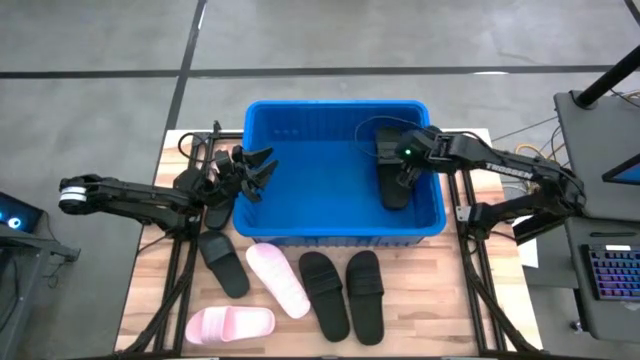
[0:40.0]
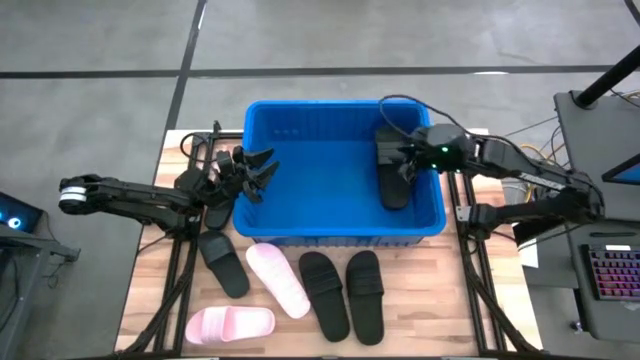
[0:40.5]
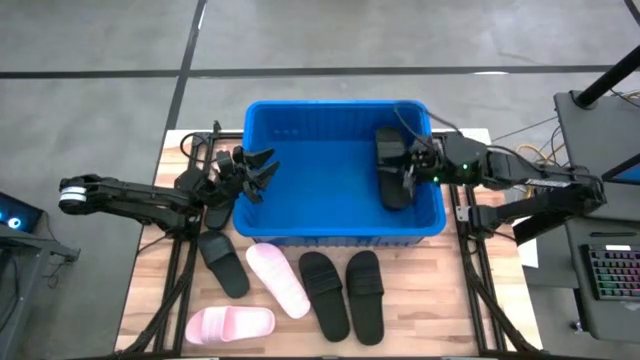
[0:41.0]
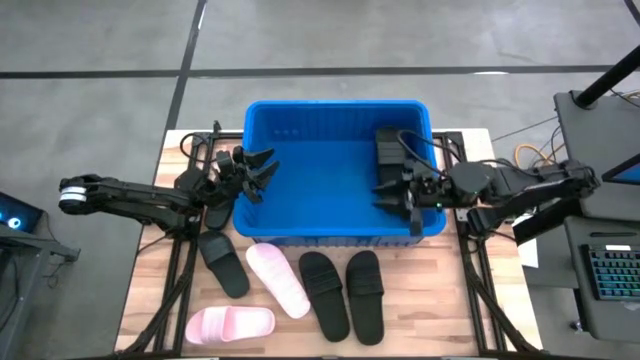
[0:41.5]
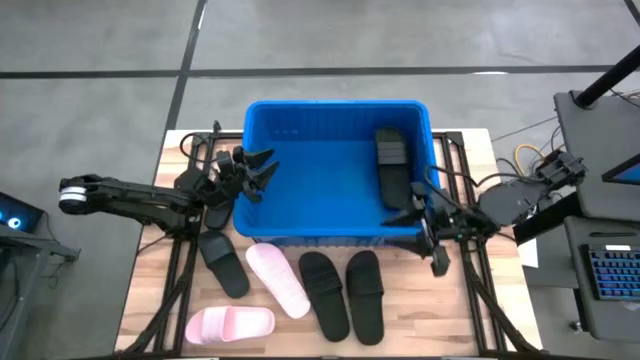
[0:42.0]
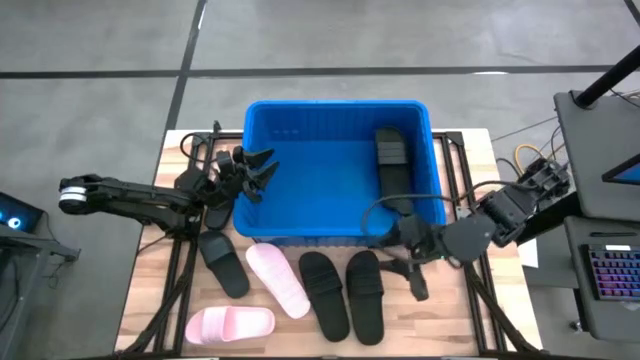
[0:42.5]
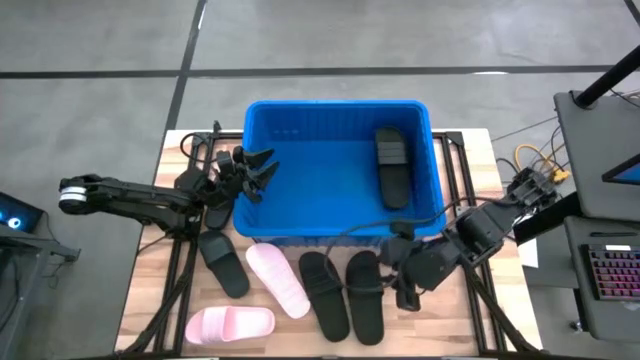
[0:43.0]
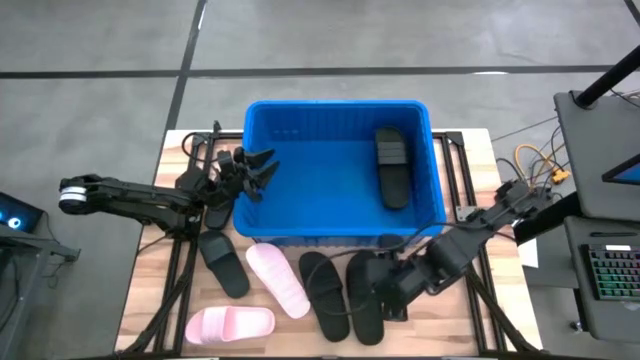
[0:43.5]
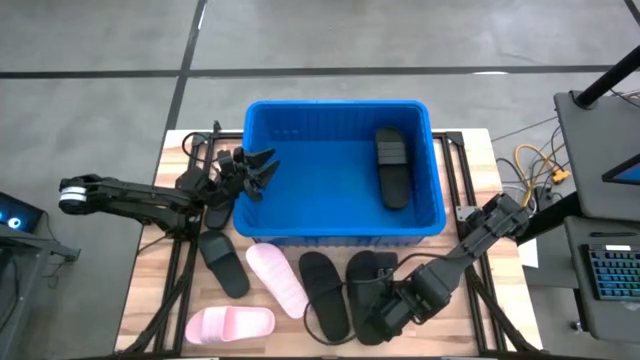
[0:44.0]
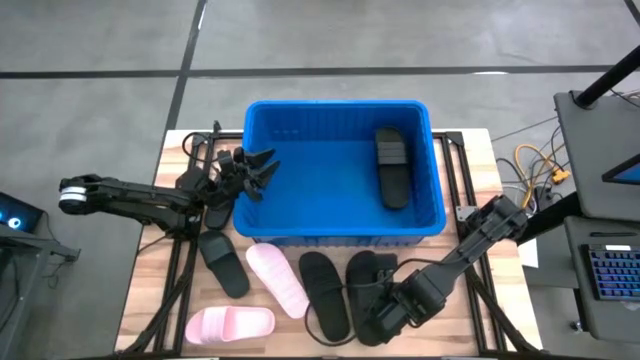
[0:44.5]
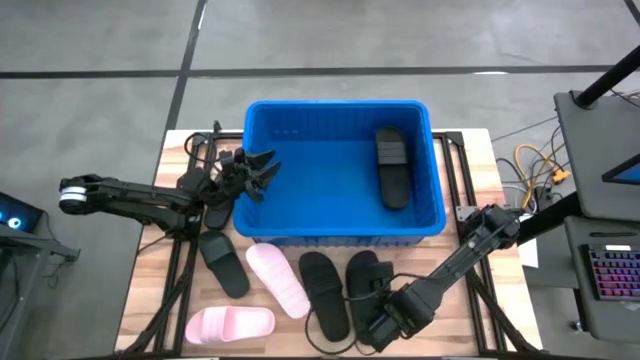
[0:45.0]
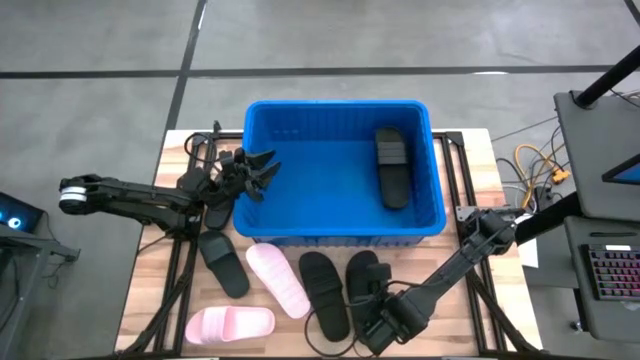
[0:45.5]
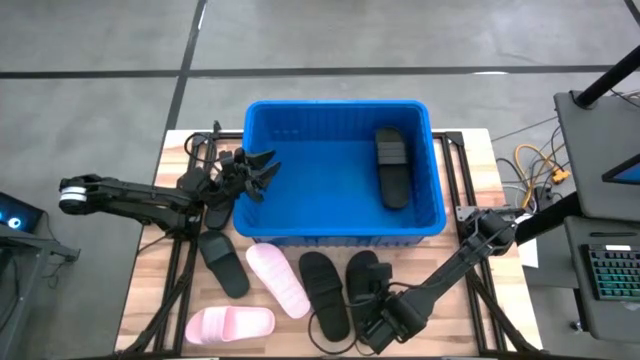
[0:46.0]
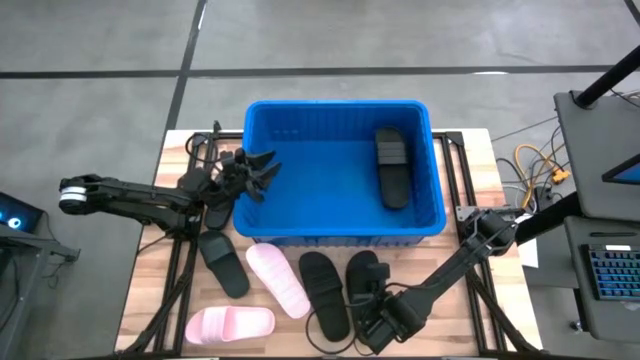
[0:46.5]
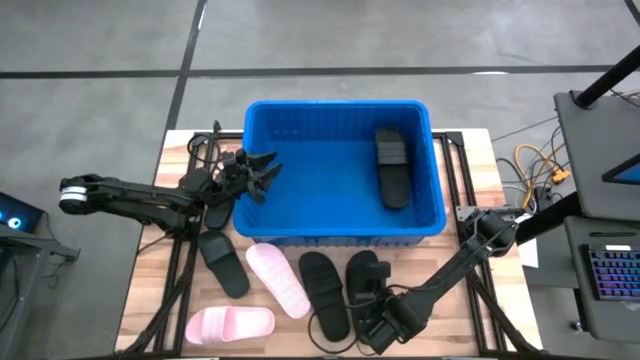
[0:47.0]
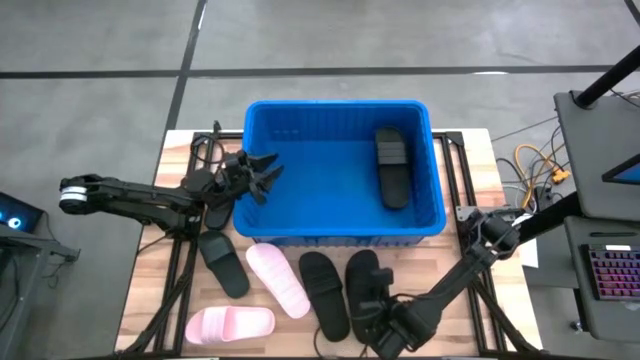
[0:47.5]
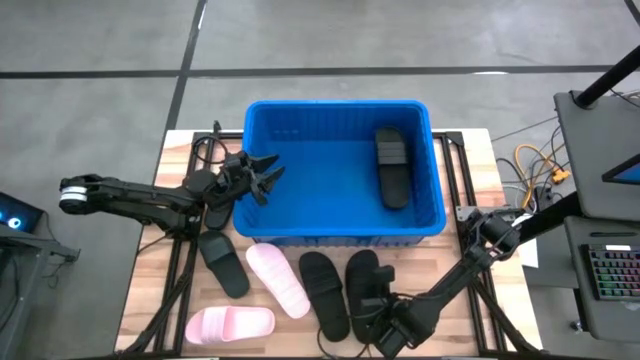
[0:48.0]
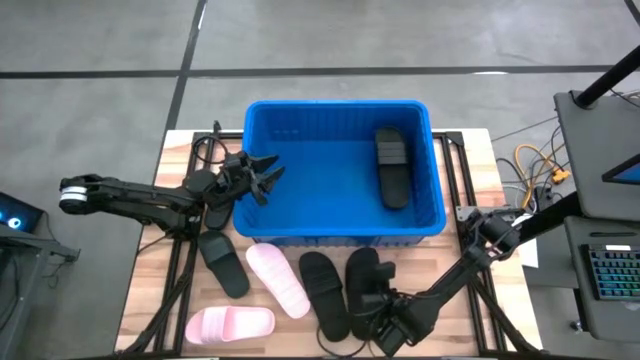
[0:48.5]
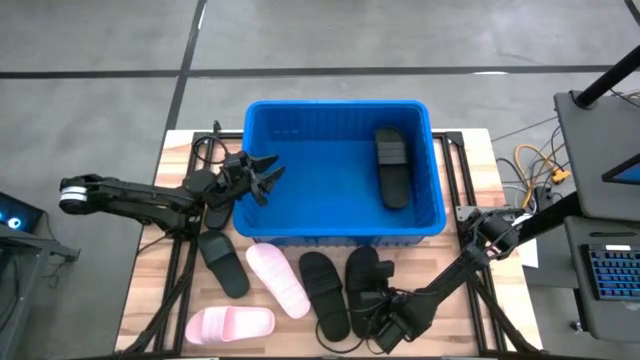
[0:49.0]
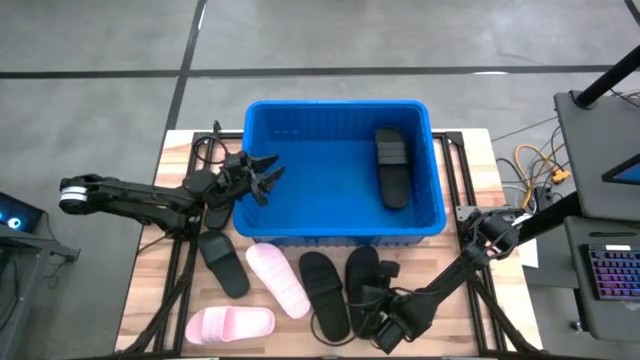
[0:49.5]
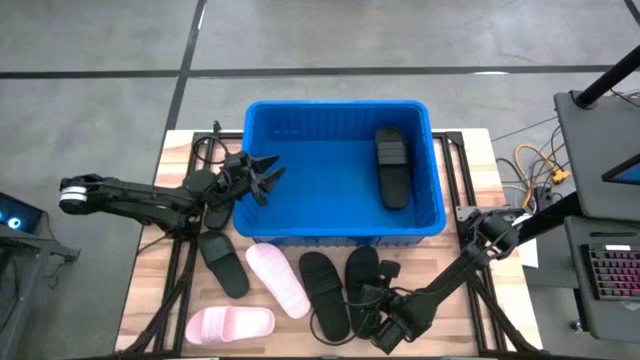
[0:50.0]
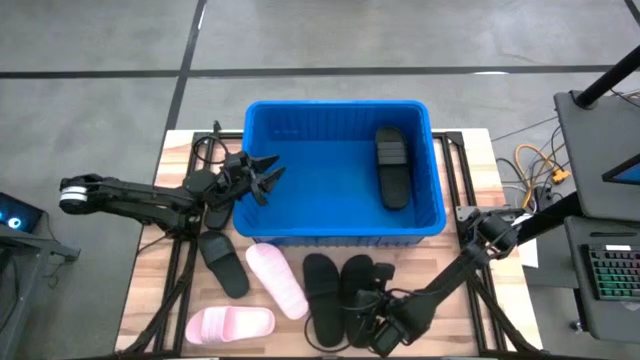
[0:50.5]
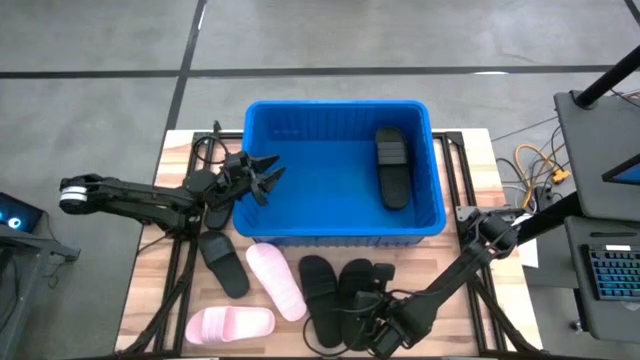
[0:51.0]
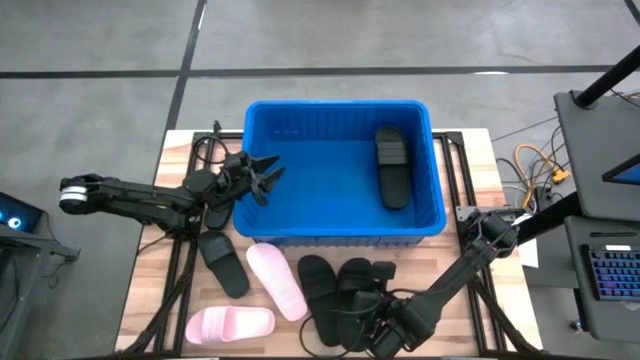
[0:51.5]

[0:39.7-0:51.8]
Task: Pick and place slides into bin
Put the black slide into the blue bin

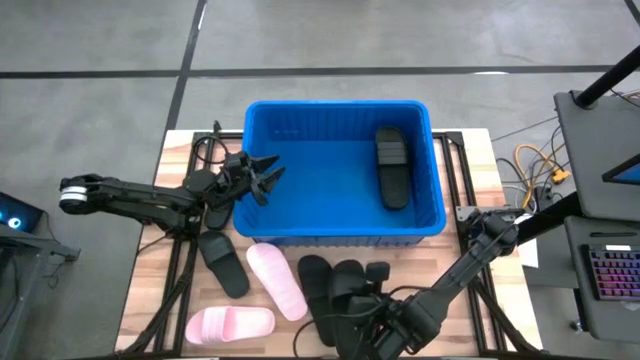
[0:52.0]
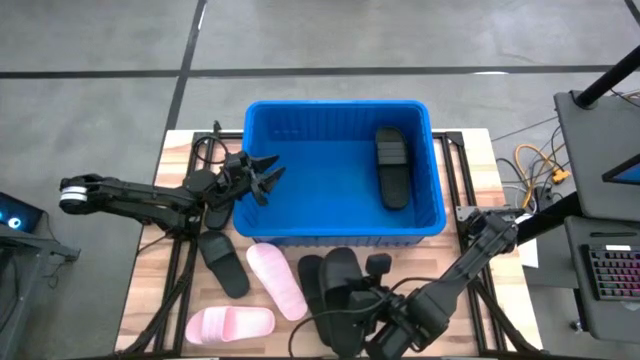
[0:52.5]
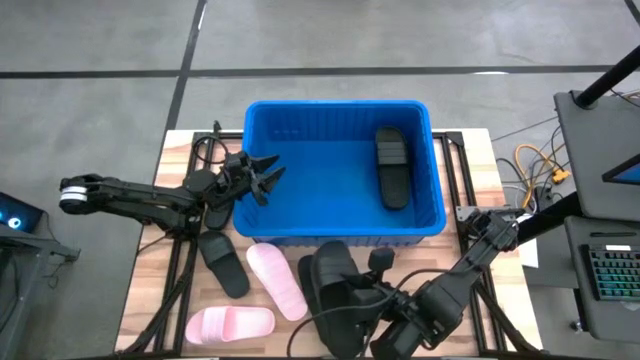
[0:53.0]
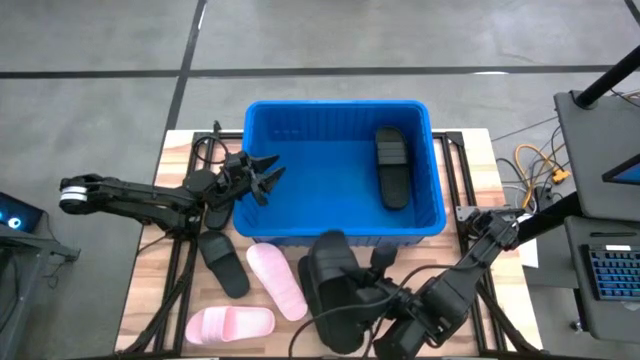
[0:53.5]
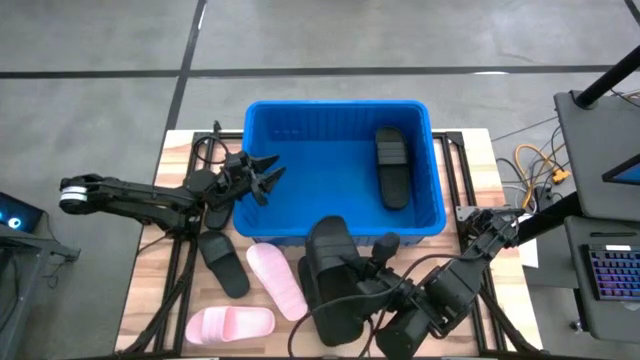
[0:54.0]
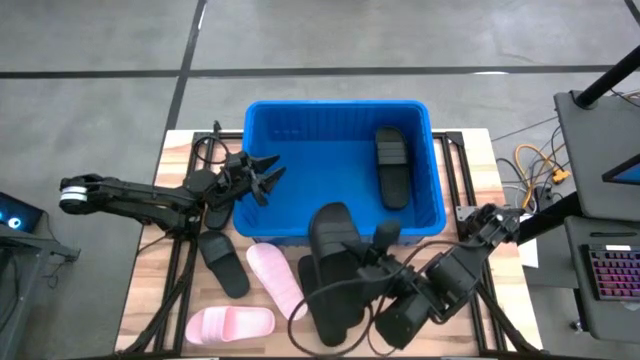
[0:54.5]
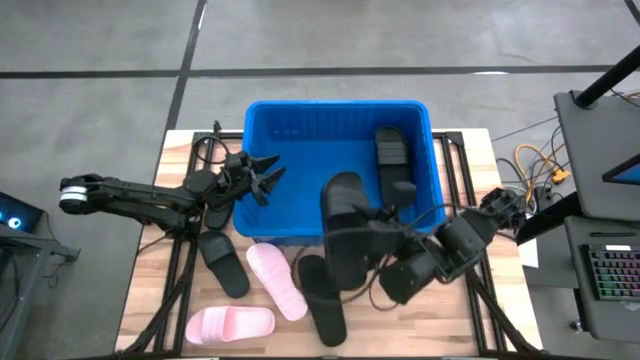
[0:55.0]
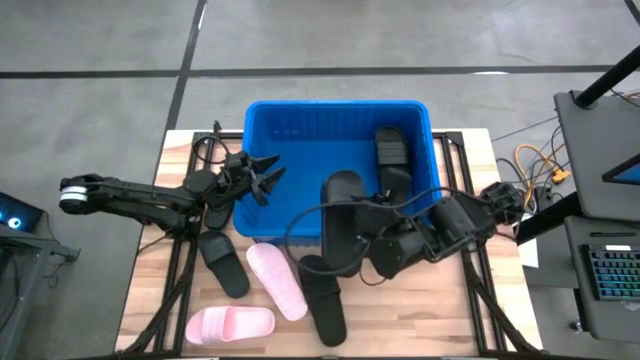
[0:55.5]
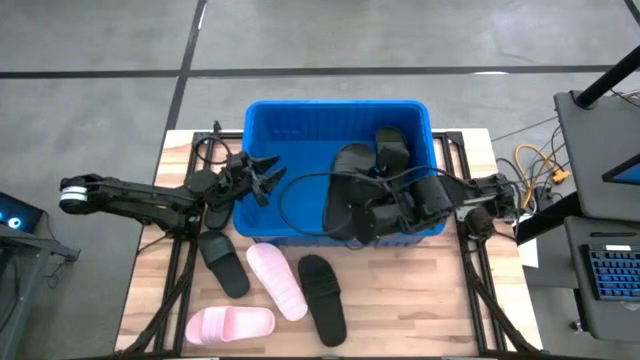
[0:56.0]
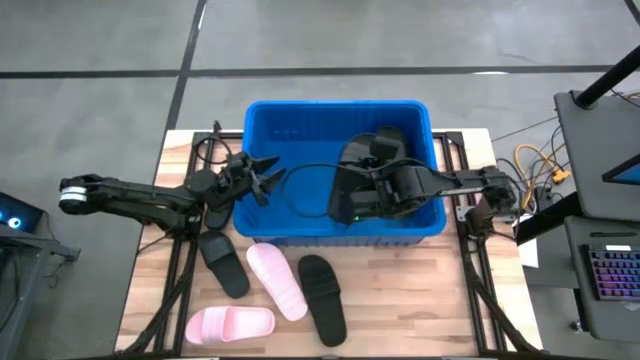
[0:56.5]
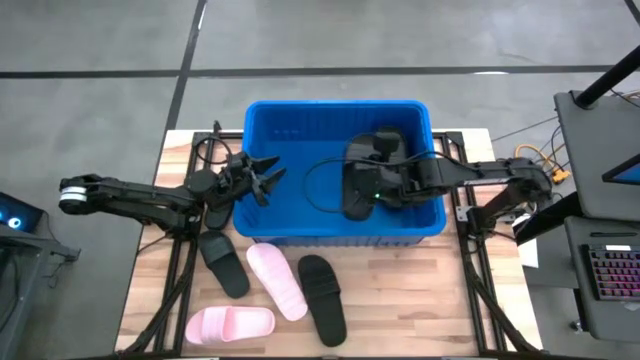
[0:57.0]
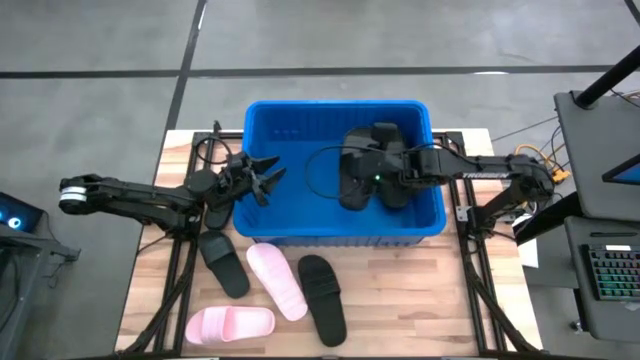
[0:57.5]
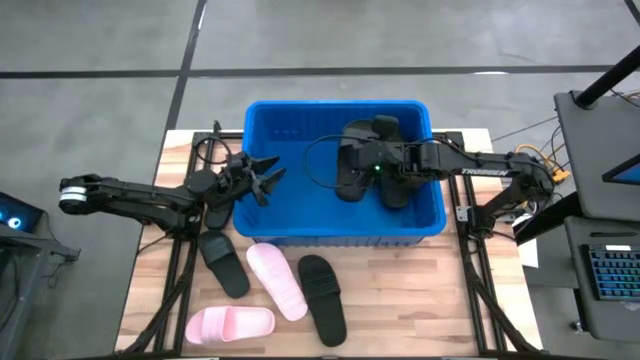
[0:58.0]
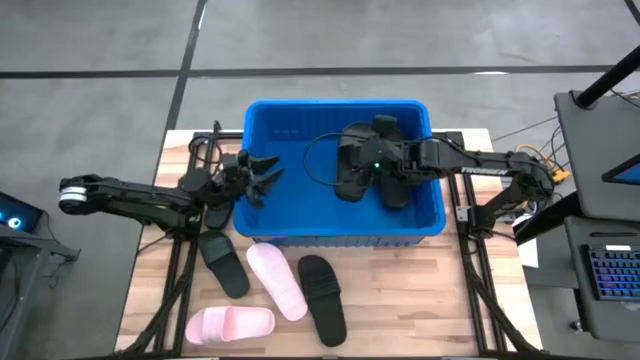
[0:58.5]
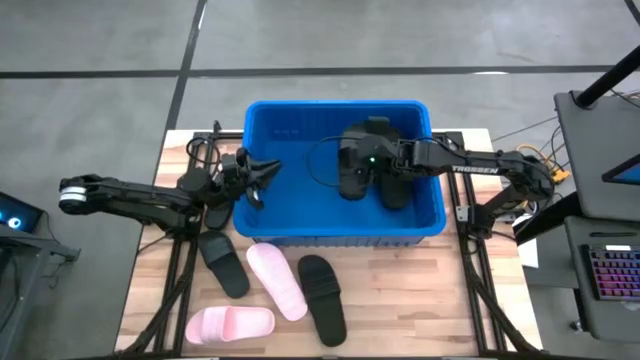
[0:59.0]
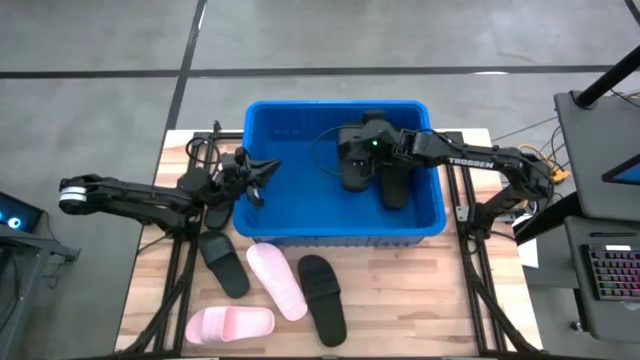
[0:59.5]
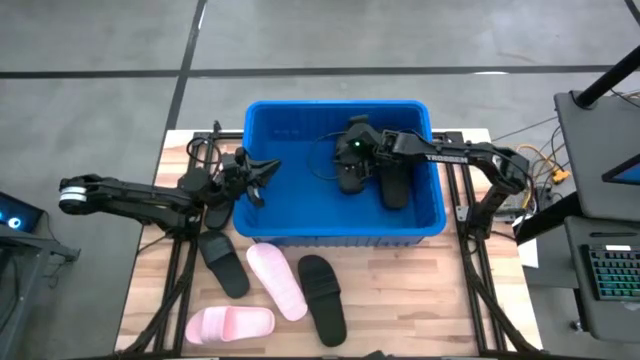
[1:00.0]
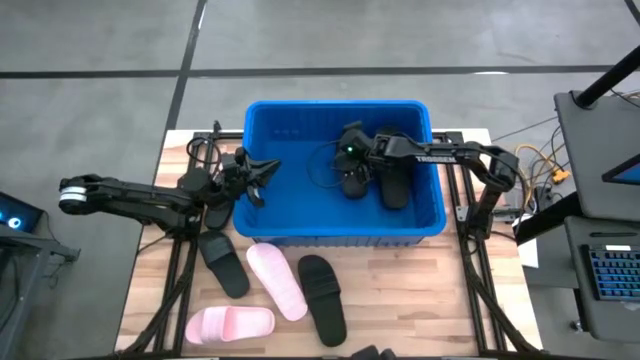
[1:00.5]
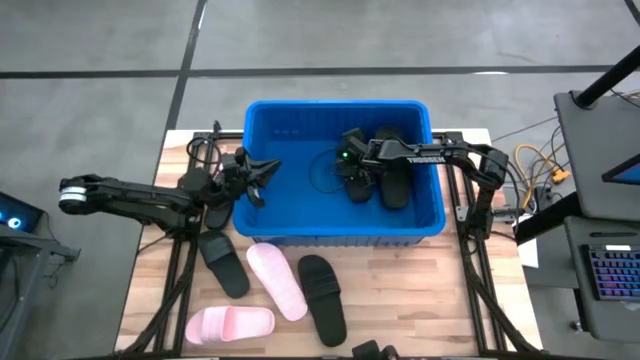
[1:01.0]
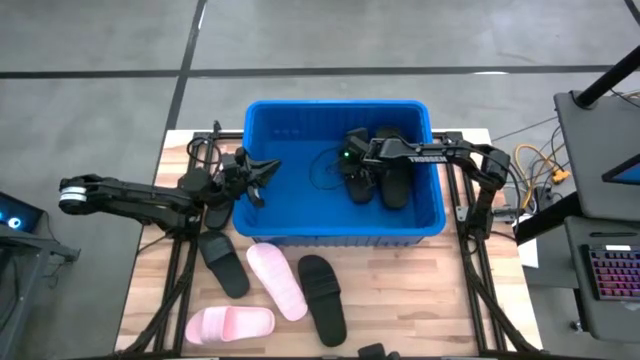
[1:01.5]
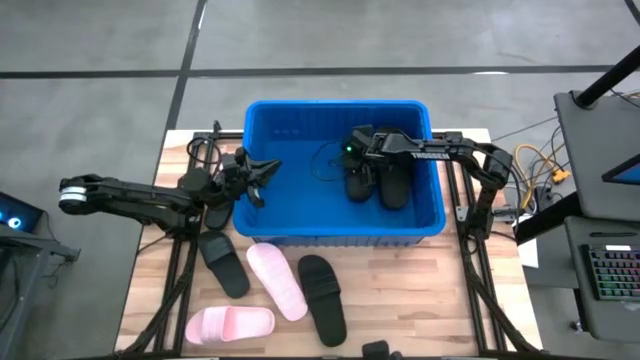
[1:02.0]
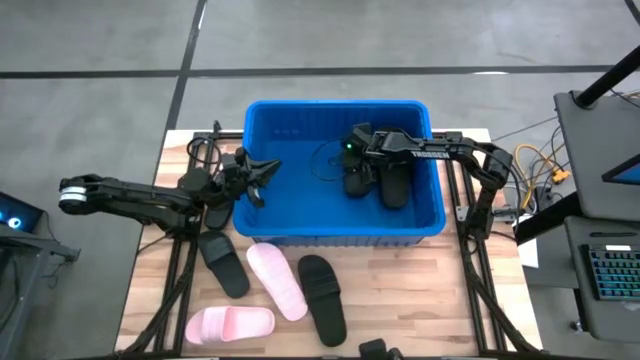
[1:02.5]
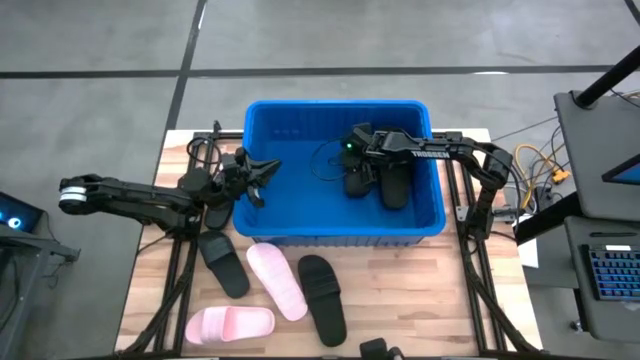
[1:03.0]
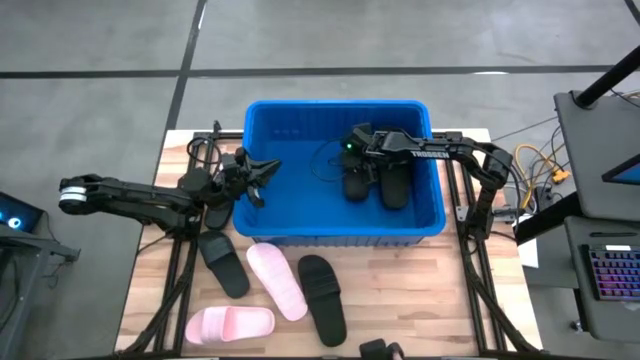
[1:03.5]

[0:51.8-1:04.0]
Put the black slide into the blue bin
